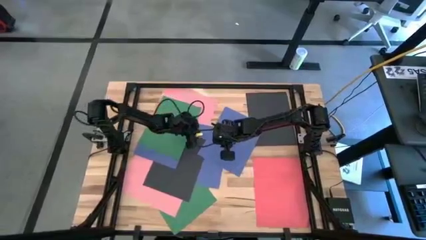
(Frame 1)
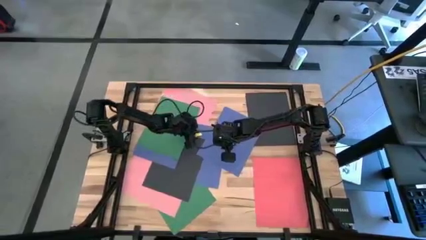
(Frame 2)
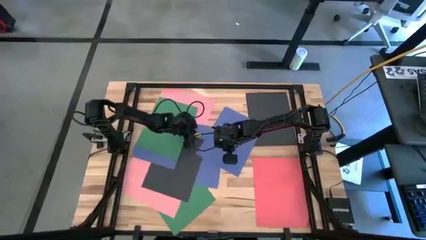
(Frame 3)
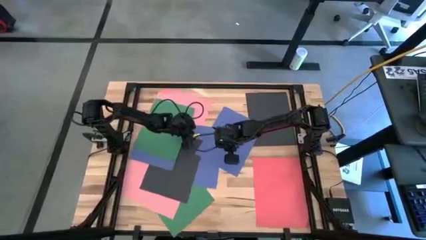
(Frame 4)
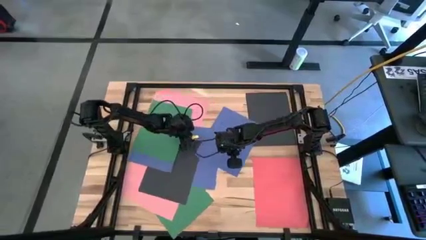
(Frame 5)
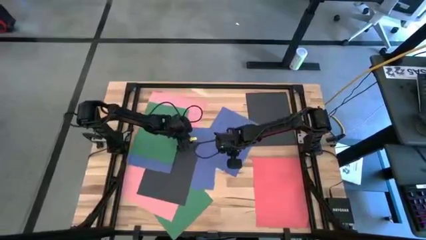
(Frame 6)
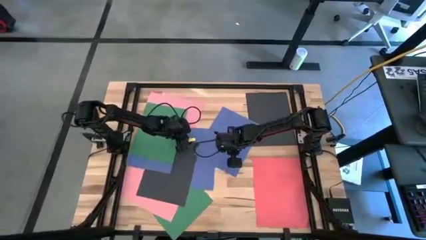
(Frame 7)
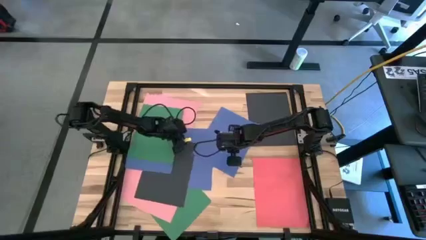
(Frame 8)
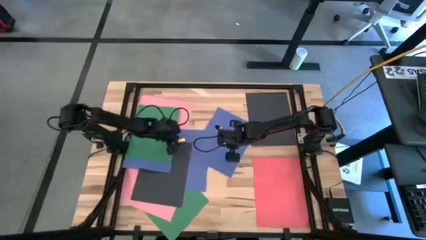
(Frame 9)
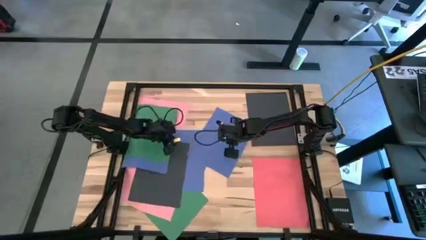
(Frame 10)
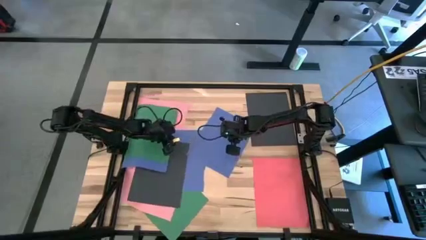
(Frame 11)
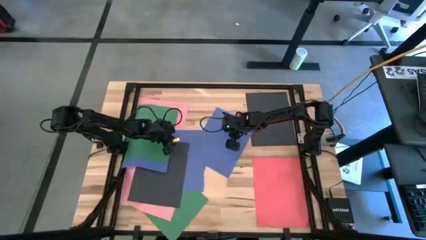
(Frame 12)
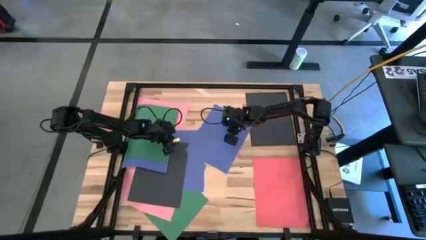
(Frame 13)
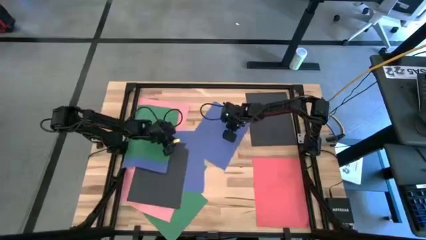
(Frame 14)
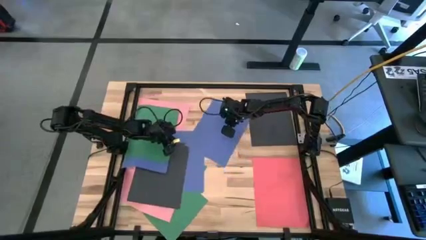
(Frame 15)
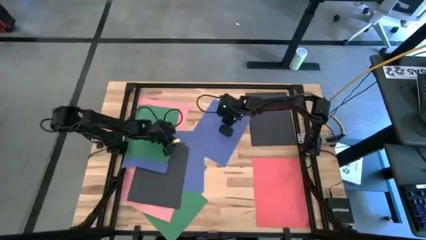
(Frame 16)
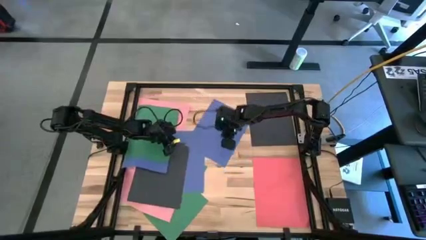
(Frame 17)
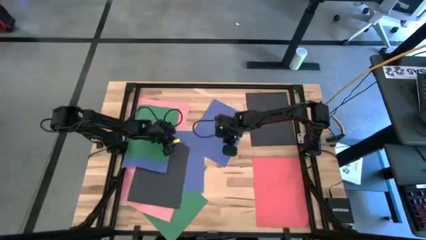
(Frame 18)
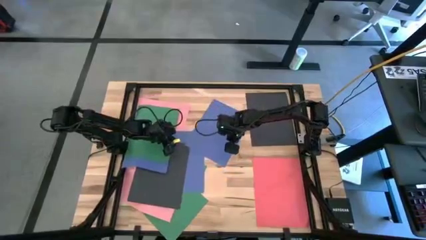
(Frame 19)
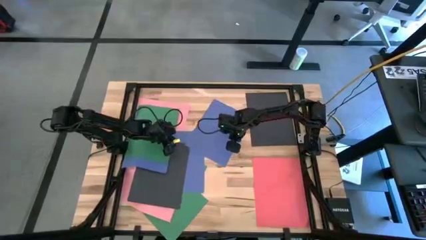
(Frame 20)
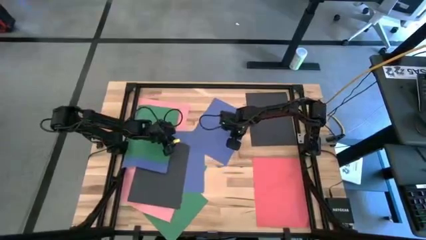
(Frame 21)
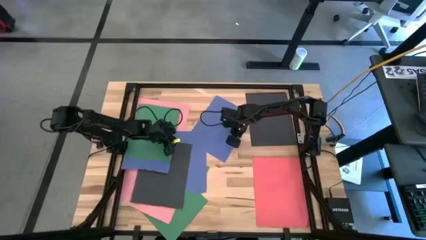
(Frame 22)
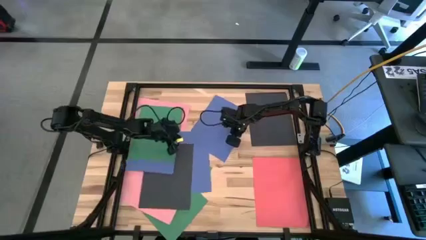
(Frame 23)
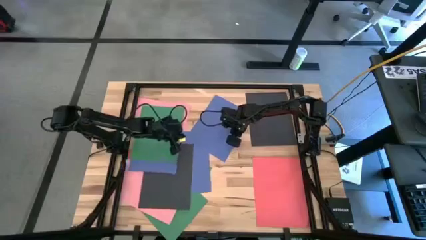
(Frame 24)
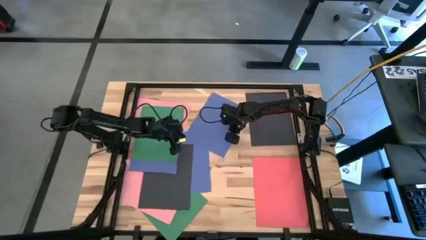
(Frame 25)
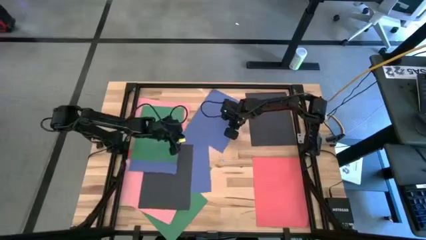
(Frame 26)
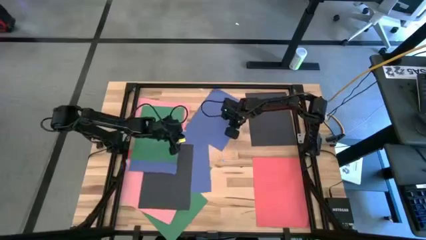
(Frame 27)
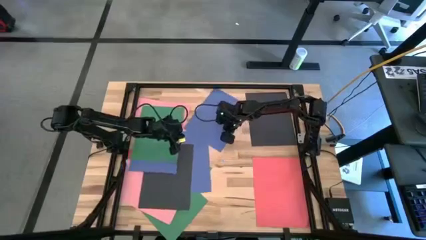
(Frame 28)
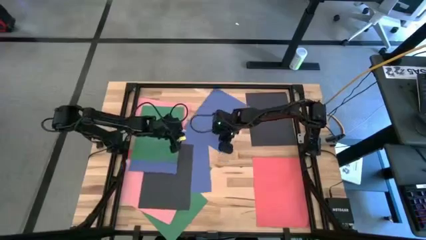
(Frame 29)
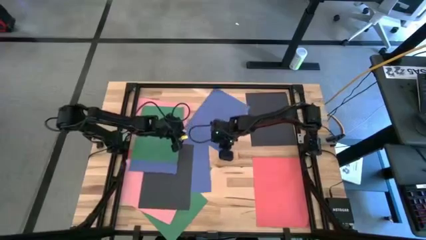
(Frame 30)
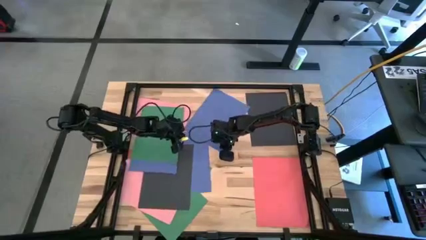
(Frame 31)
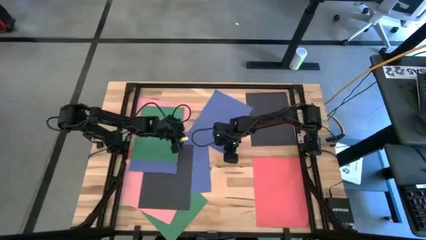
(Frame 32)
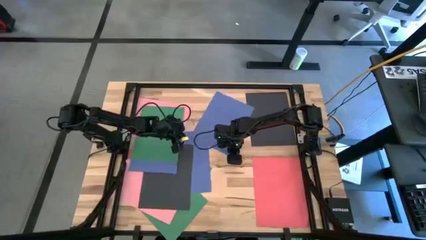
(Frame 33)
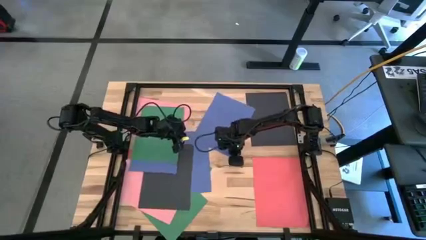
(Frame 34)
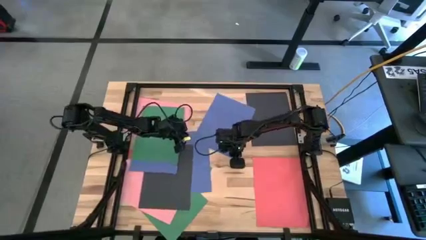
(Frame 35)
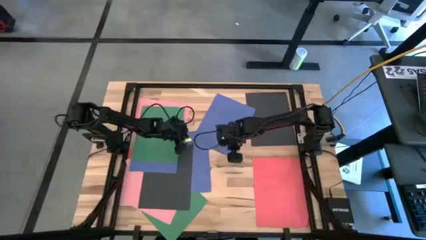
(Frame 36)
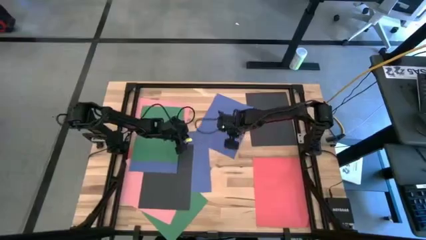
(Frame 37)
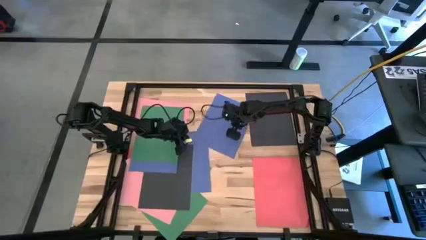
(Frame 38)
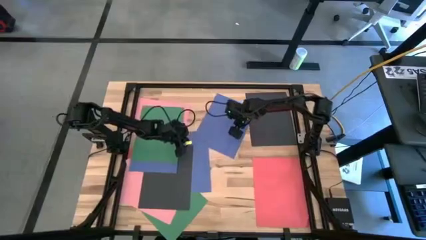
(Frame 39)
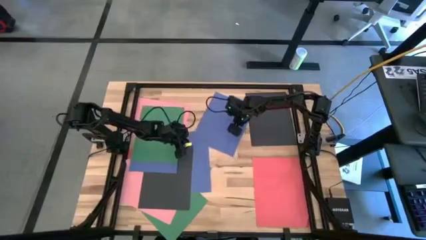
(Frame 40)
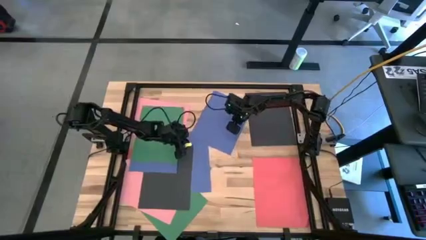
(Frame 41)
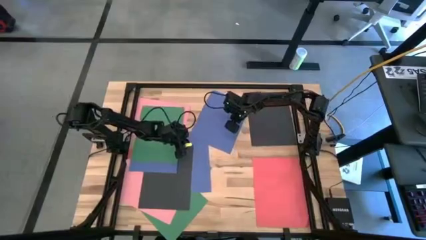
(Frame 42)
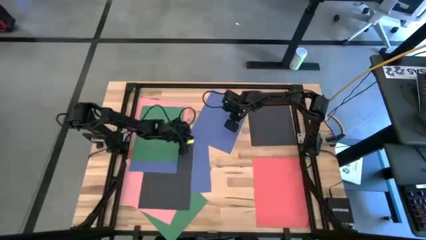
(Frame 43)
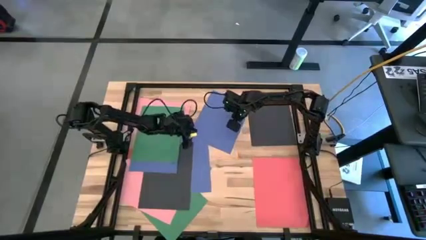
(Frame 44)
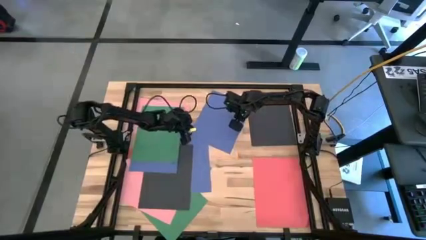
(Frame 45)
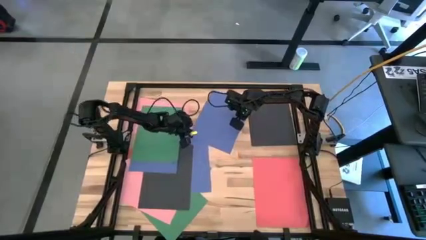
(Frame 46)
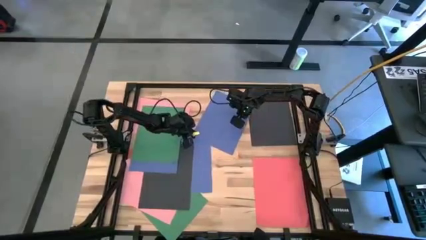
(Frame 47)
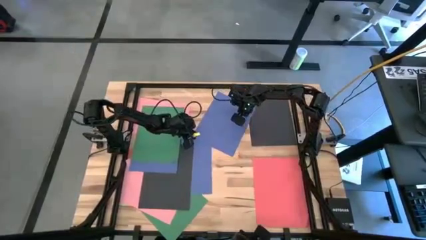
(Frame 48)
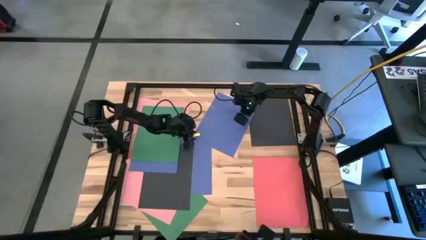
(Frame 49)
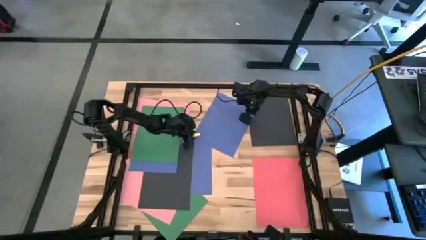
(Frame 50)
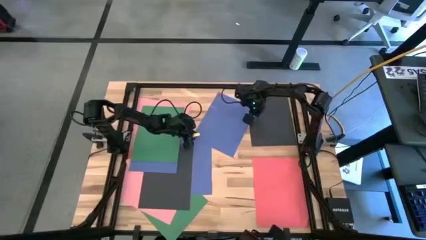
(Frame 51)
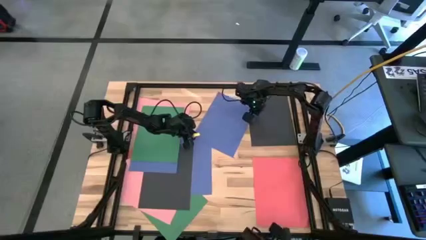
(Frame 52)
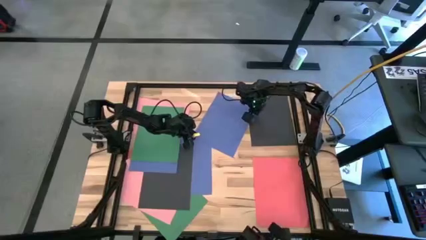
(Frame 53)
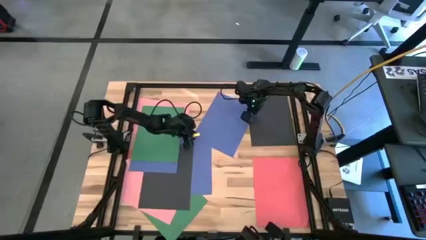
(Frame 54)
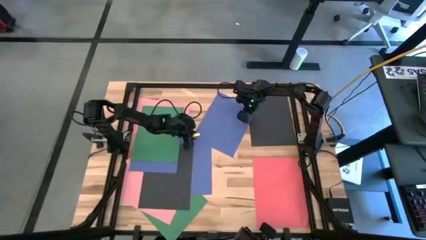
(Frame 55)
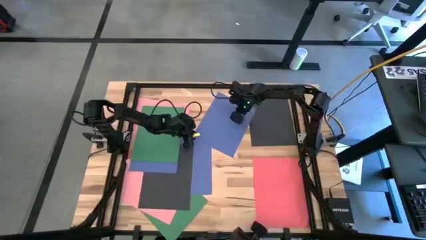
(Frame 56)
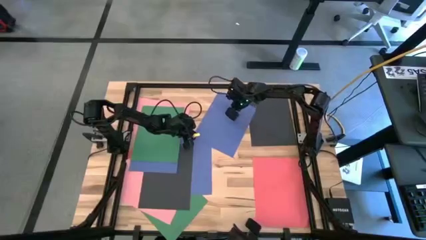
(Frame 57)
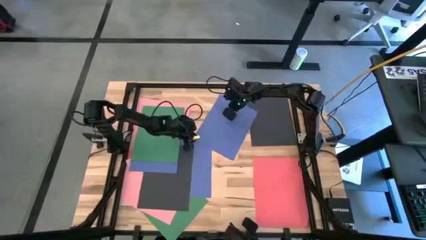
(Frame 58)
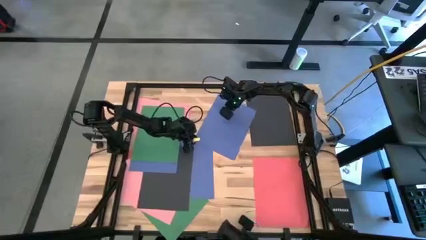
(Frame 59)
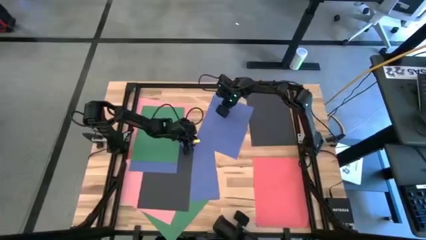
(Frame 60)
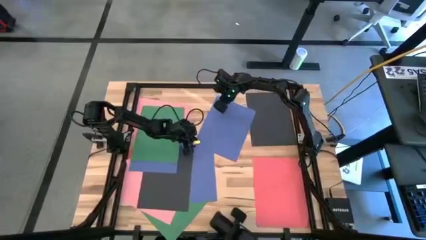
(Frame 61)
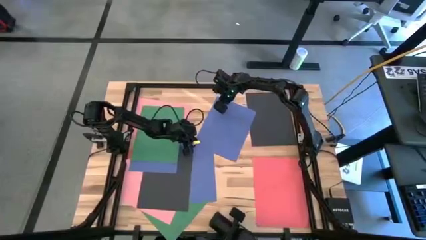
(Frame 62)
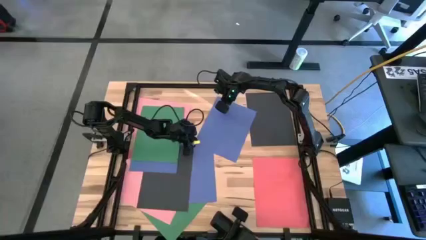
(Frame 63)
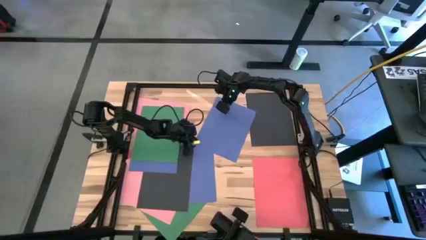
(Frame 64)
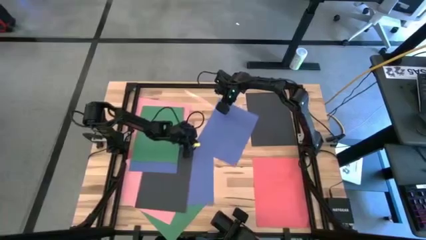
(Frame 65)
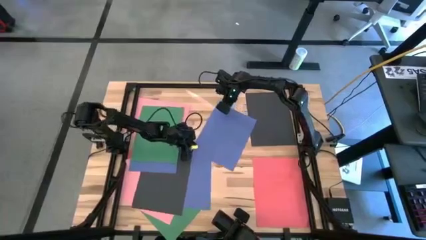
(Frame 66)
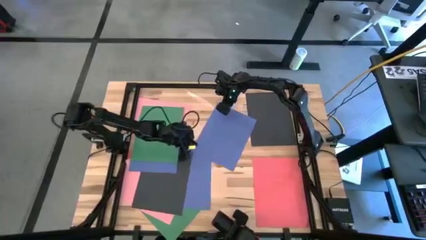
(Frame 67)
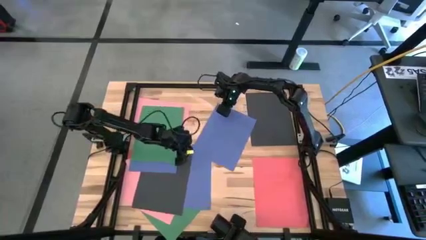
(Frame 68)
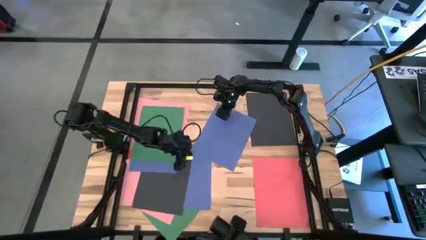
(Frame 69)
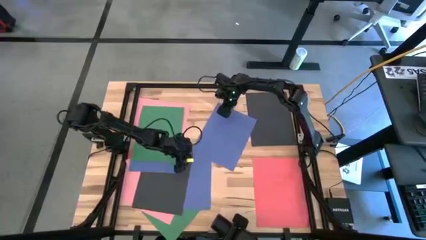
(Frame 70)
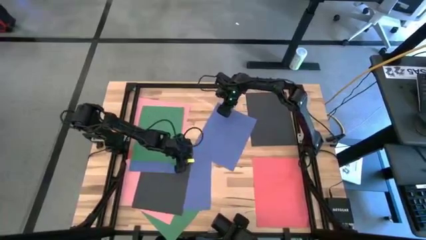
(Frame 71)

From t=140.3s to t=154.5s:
Task: Organize paper
Move the blue paper to the top center of the table
